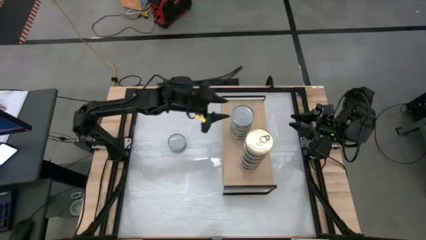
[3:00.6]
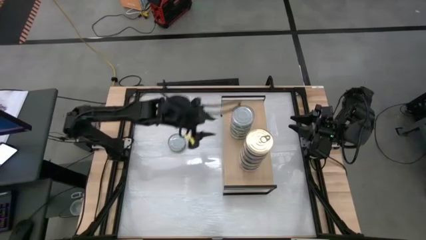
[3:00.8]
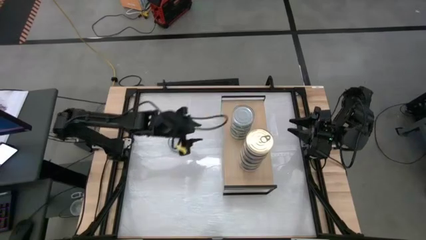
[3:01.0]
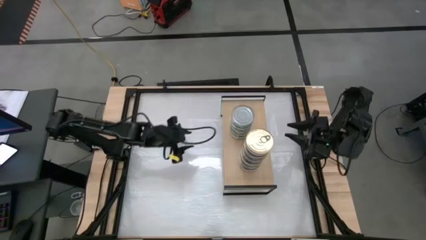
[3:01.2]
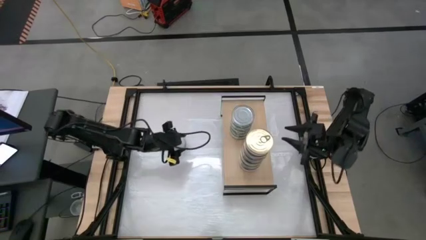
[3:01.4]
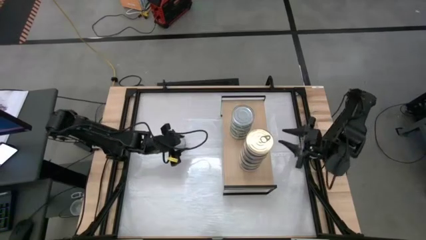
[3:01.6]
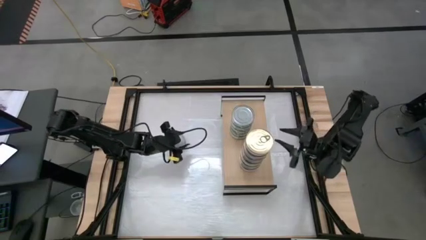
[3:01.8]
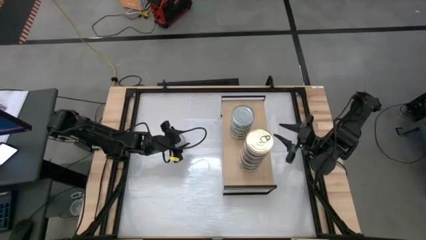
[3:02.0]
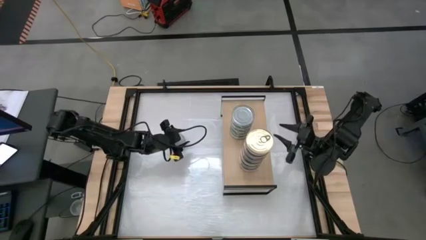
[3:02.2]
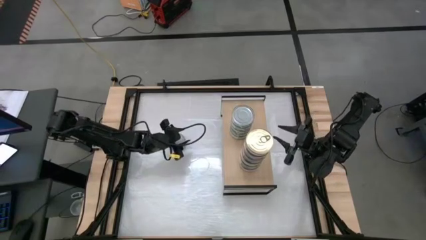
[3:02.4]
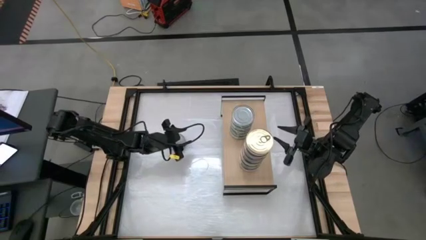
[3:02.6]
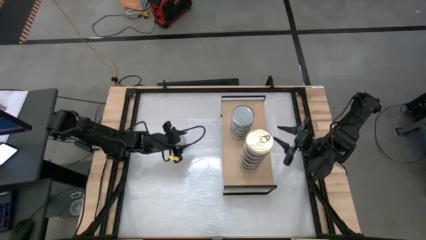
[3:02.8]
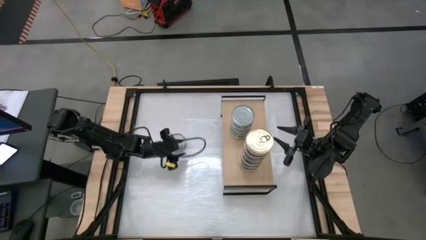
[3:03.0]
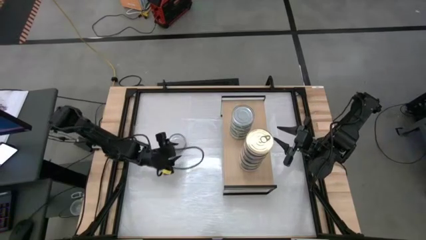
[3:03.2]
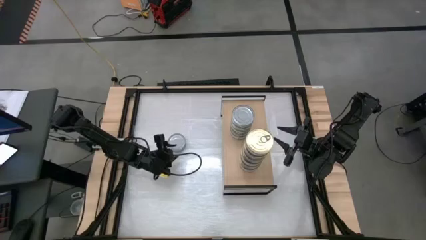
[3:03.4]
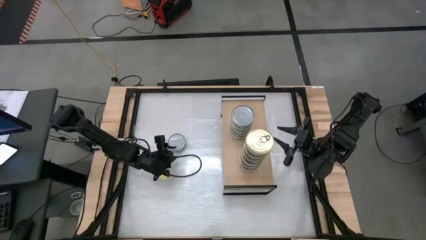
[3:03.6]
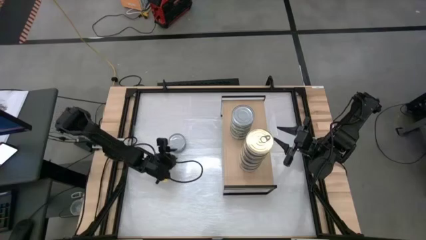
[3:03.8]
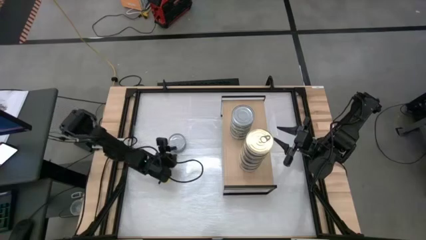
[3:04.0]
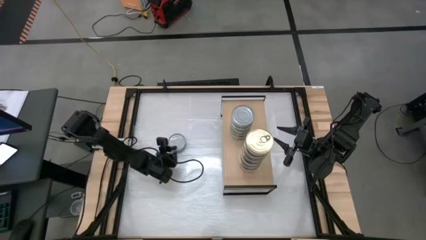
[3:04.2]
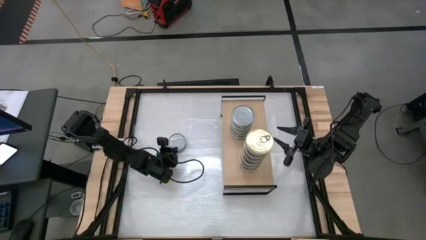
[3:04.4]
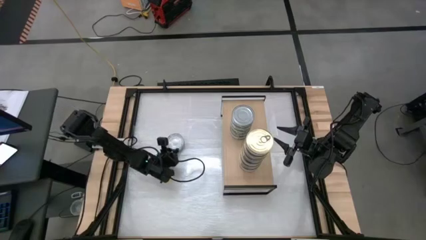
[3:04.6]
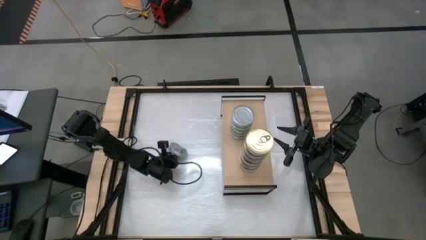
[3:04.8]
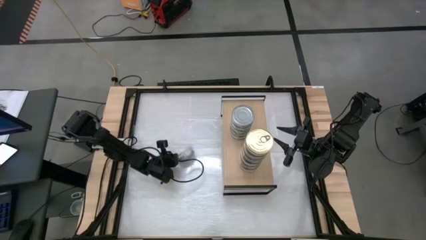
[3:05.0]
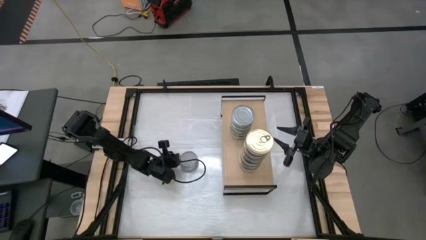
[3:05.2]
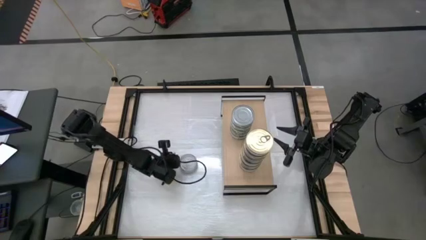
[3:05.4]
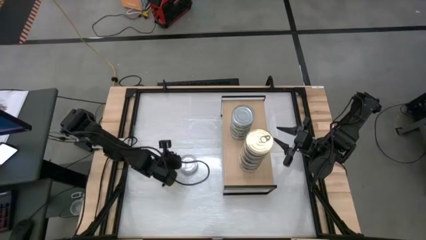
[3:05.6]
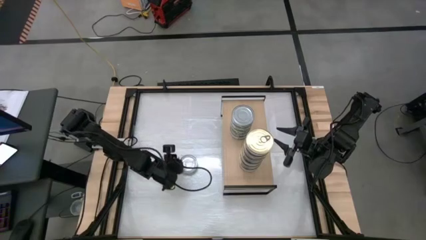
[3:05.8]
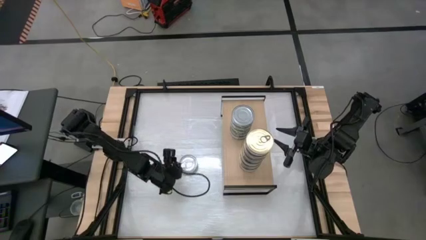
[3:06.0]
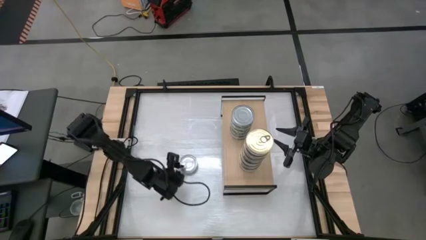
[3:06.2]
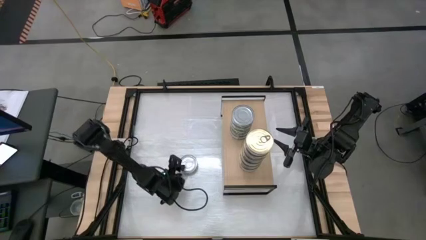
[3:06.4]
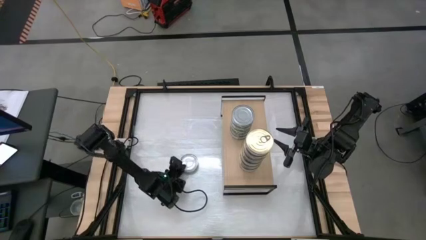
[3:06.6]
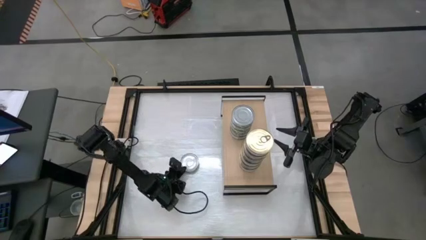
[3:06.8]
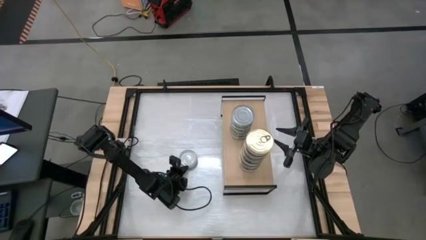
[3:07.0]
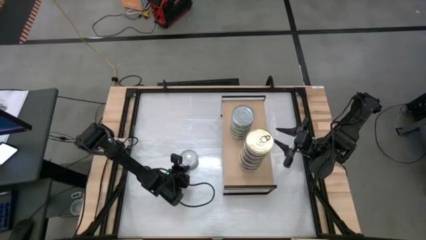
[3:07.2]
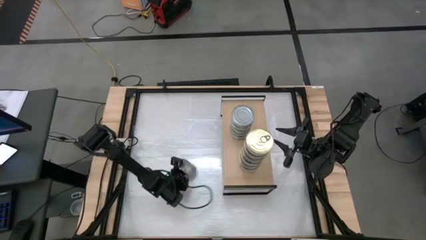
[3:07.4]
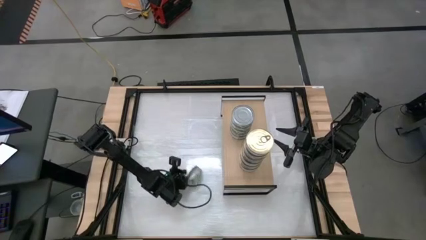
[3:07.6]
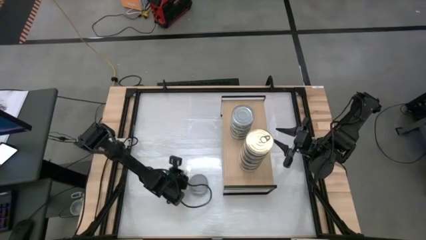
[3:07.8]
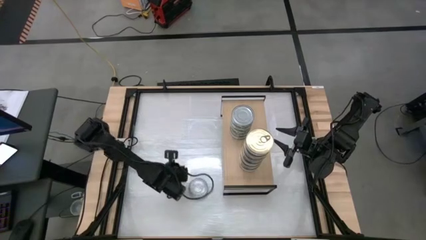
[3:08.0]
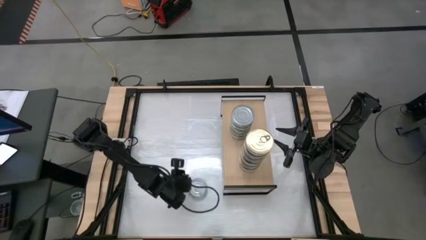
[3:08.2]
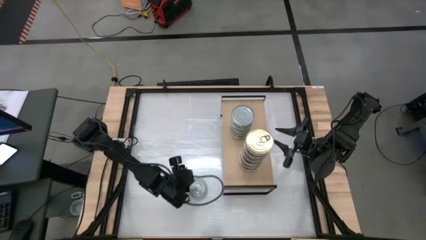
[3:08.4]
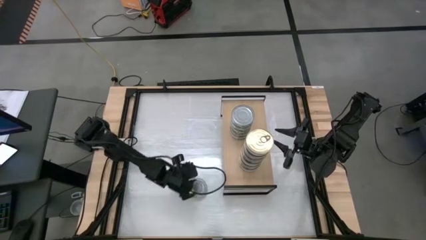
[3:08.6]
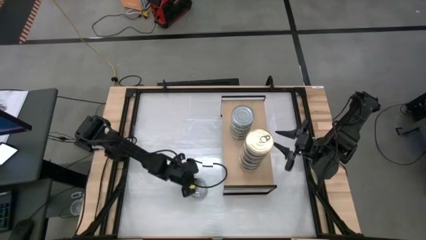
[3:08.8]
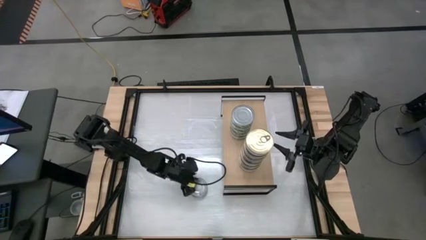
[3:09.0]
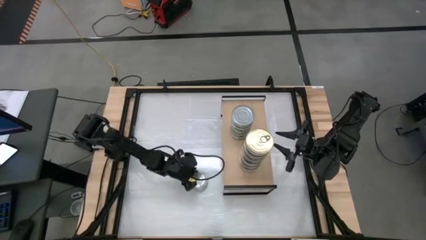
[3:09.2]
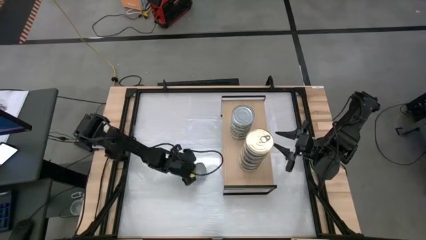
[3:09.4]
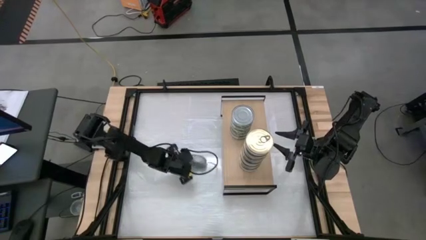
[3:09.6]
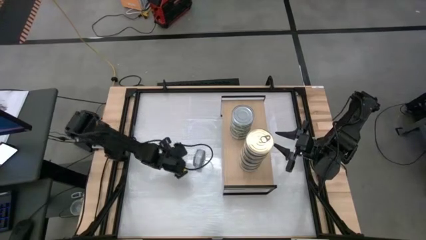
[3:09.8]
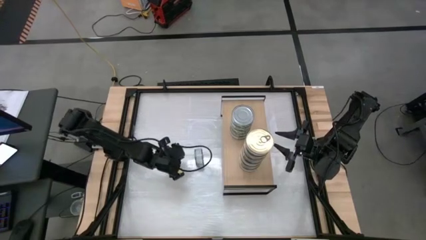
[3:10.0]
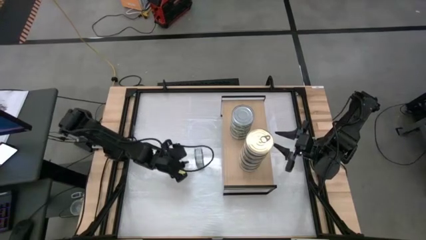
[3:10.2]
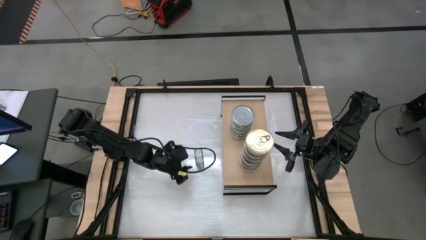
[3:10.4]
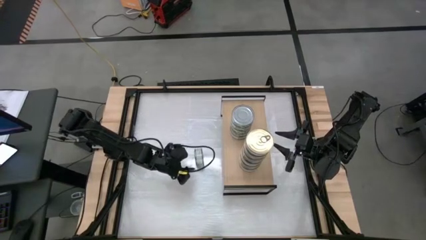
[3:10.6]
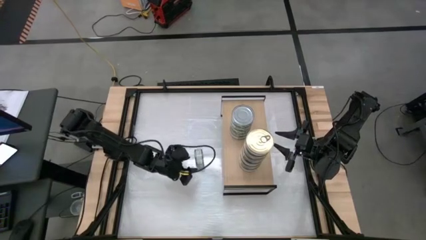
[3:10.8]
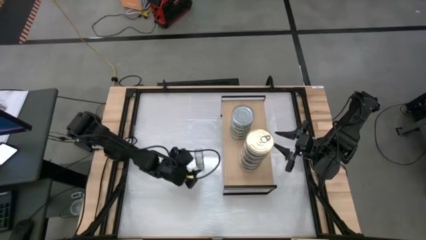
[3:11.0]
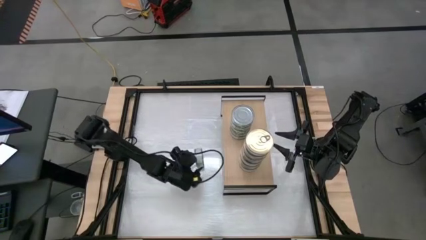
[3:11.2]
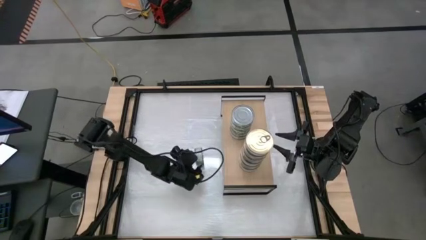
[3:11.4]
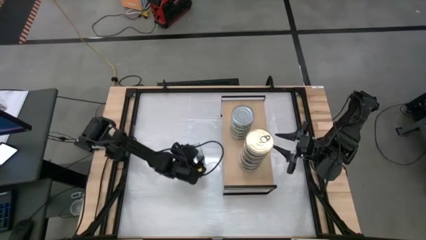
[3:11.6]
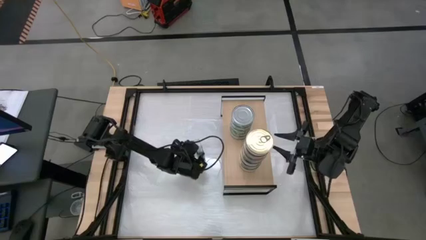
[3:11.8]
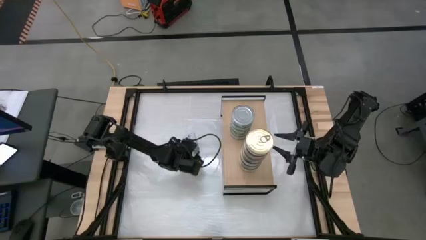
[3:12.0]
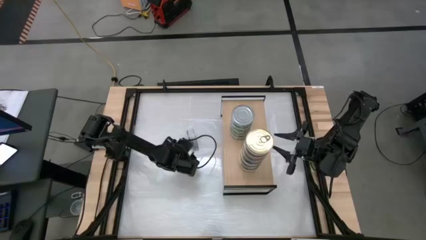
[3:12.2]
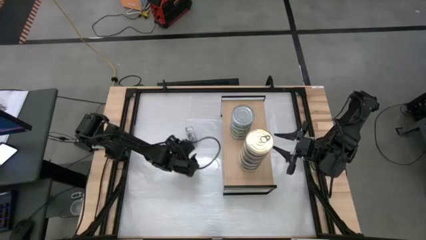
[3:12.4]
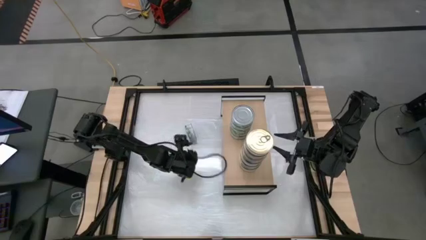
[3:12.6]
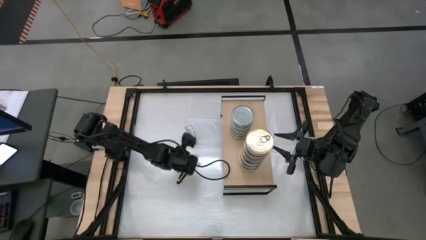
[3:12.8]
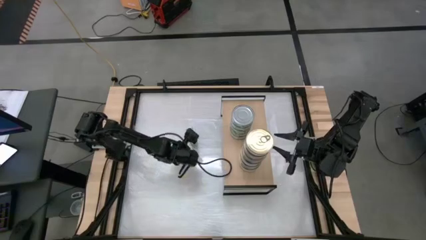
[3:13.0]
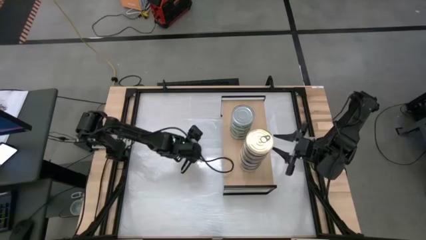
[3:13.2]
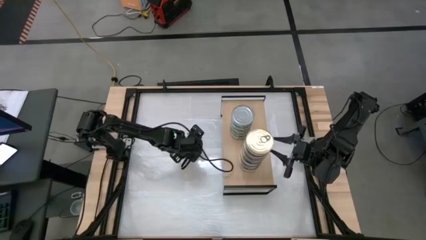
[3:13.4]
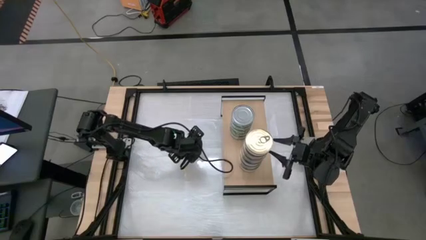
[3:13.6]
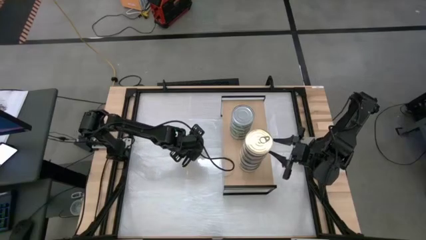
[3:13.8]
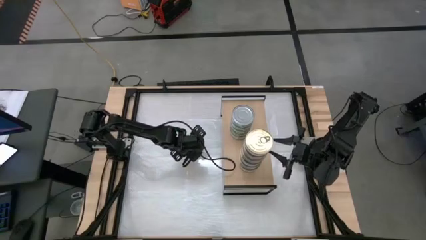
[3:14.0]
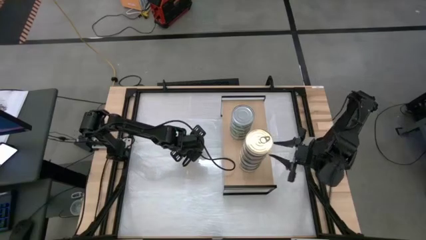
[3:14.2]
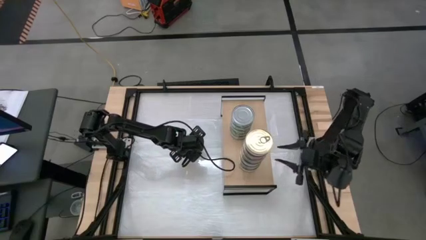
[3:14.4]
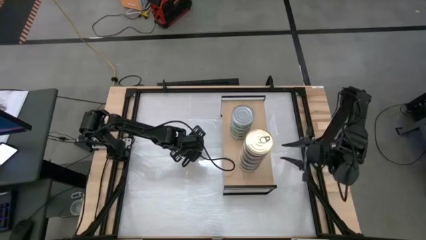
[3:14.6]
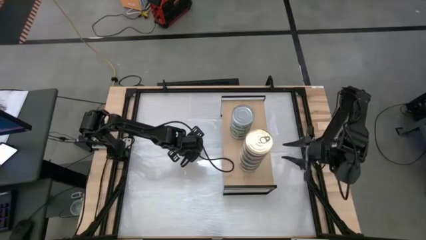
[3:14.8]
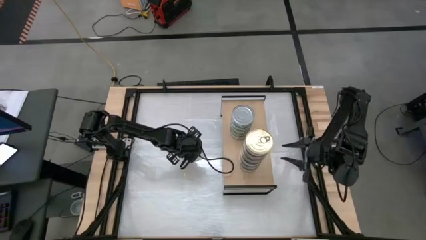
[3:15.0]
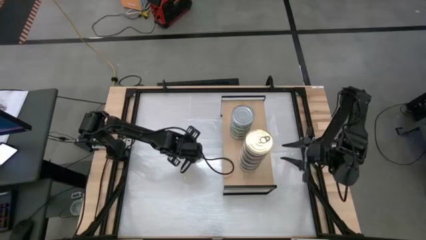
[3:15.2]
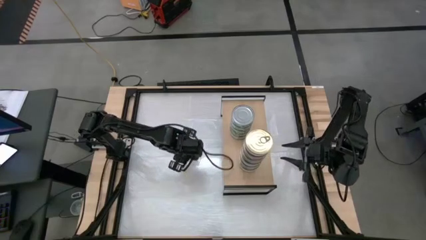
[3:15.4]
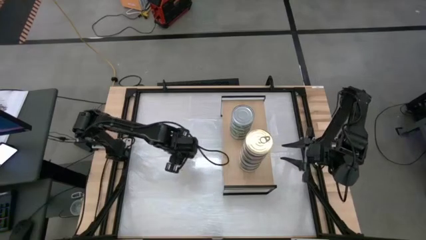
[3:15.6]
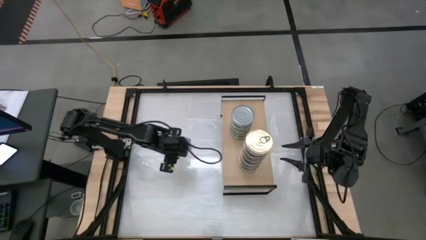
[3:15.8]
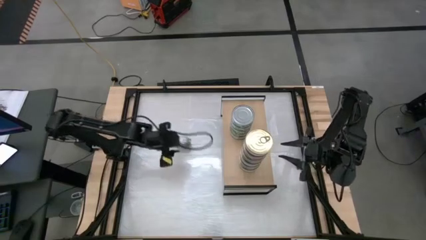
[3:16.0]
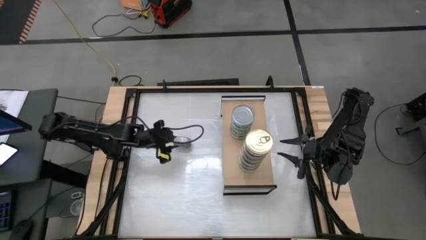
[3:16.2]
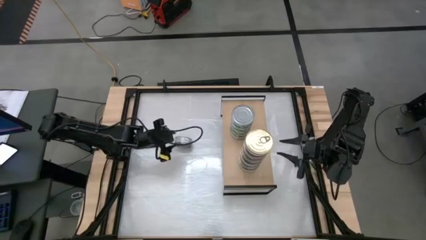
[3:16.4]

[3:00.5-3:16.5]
Task: Stack canned seafood by type on shelf
Stack the green tuna can on top of the green tuna can
